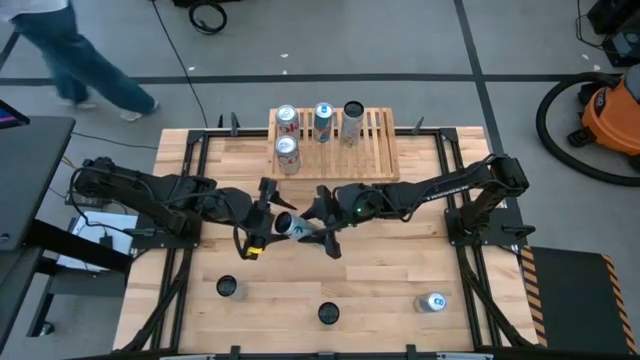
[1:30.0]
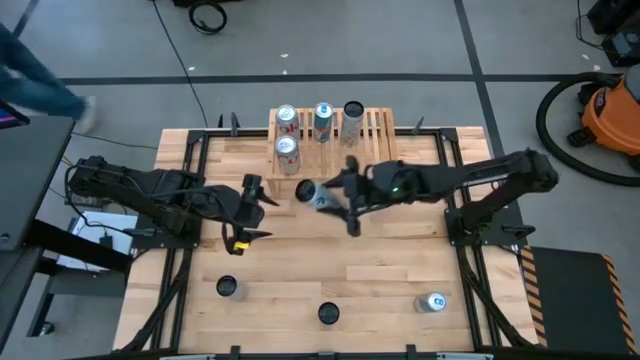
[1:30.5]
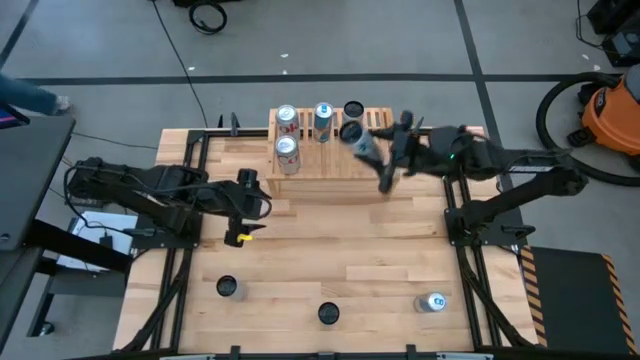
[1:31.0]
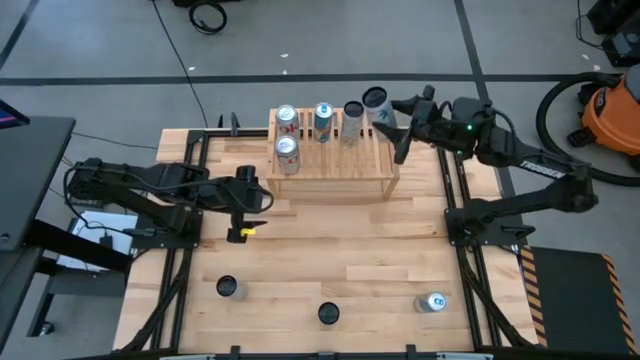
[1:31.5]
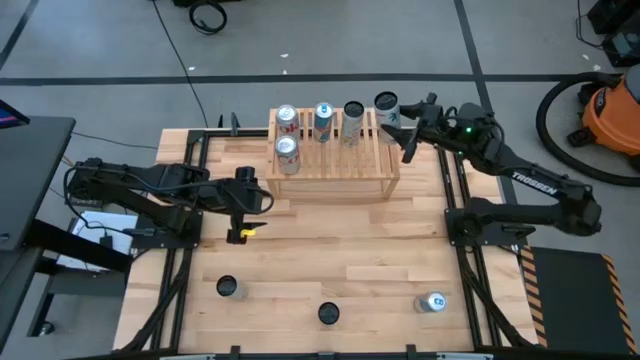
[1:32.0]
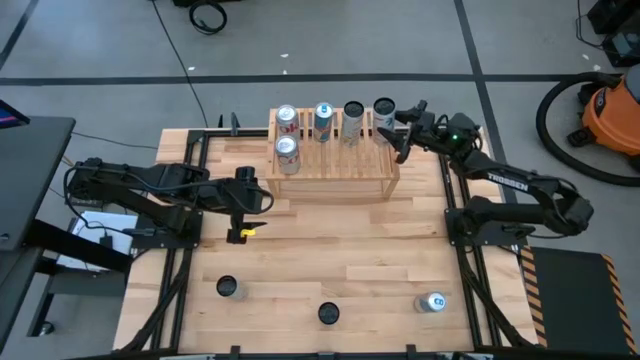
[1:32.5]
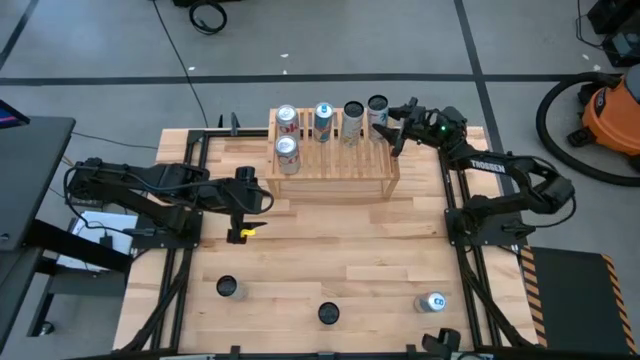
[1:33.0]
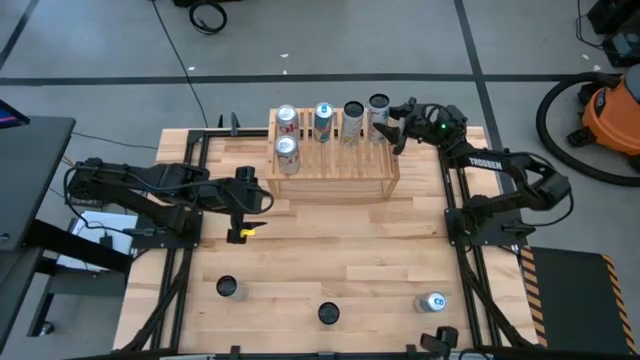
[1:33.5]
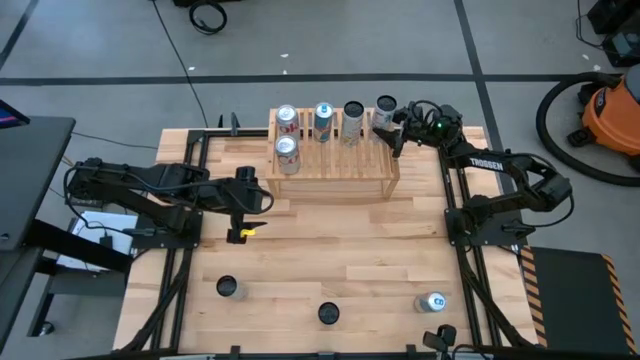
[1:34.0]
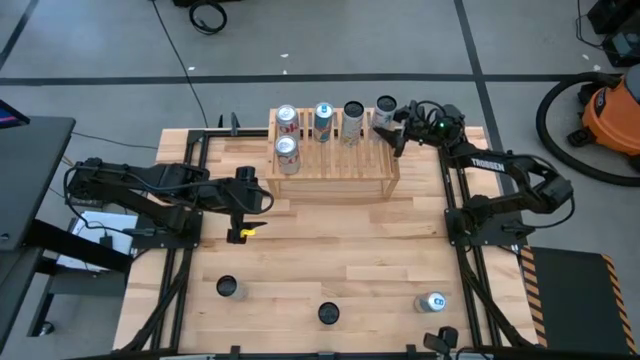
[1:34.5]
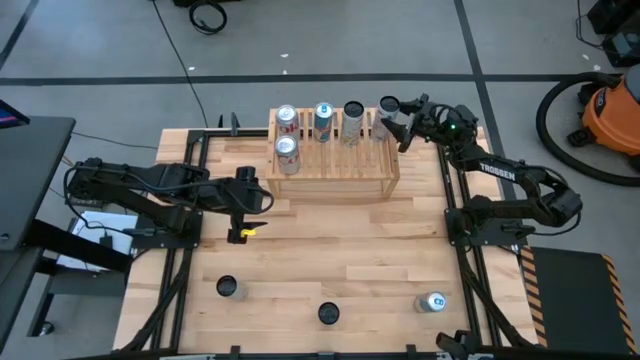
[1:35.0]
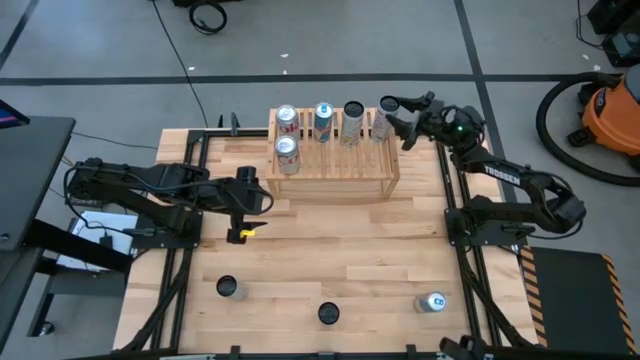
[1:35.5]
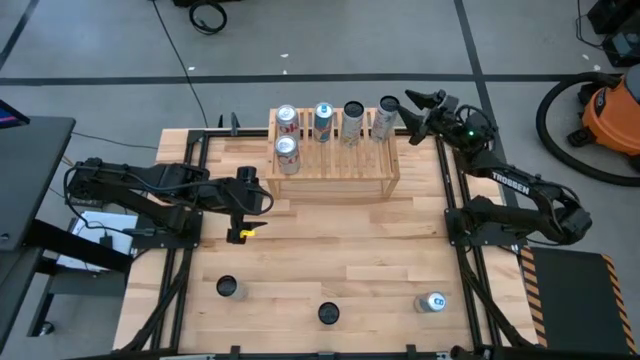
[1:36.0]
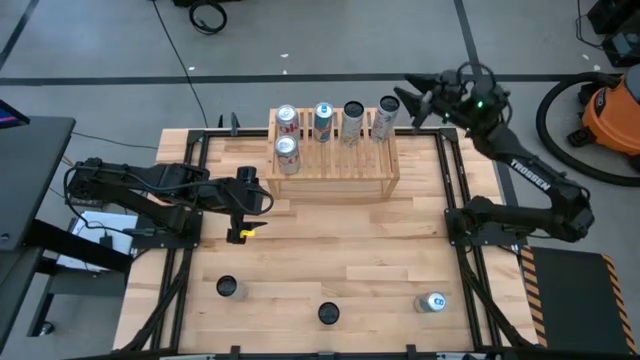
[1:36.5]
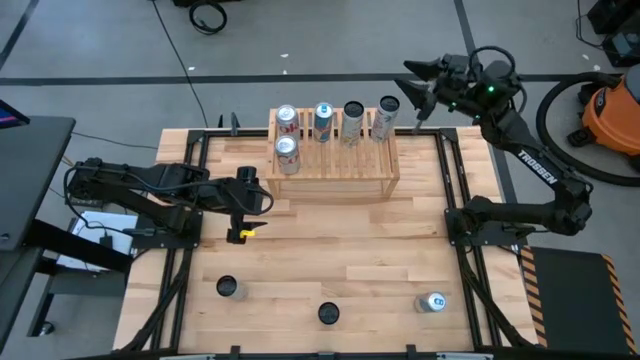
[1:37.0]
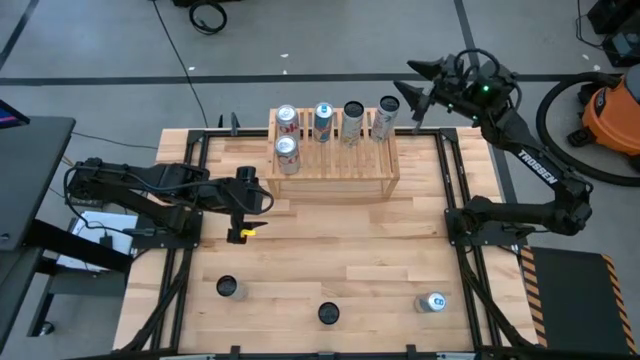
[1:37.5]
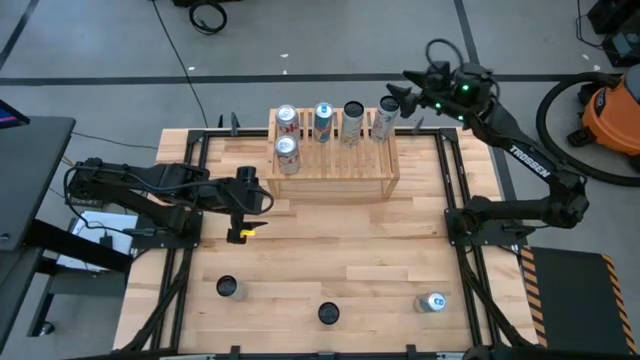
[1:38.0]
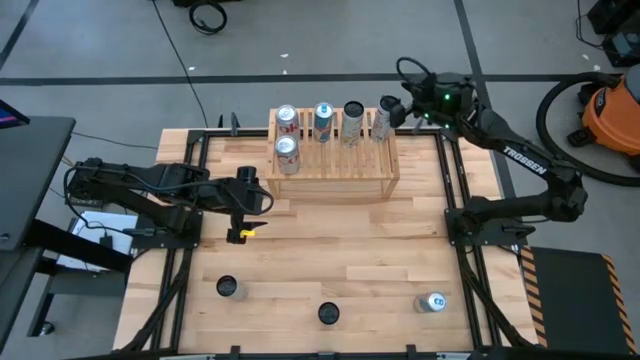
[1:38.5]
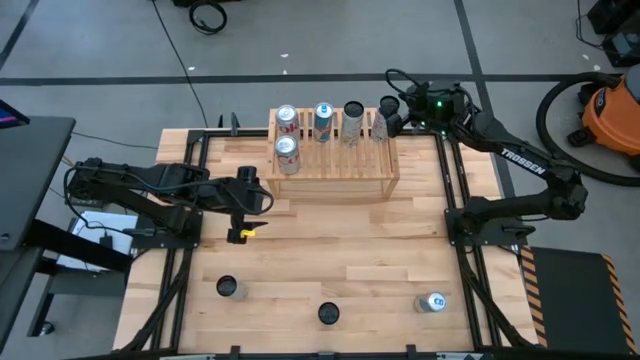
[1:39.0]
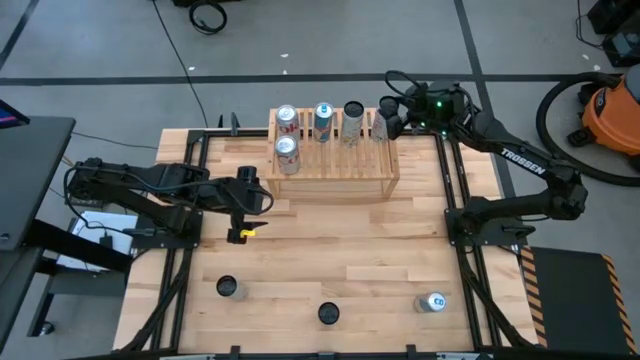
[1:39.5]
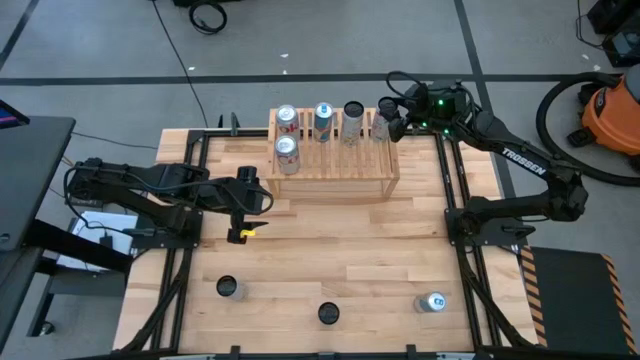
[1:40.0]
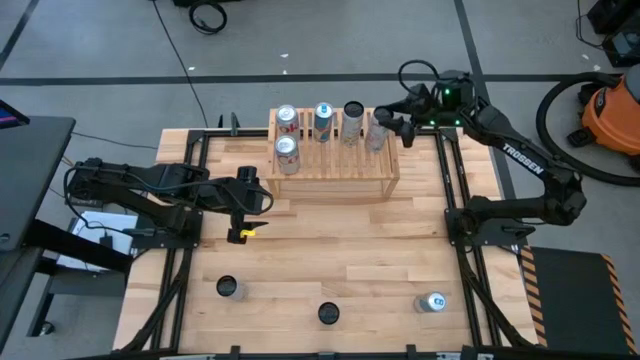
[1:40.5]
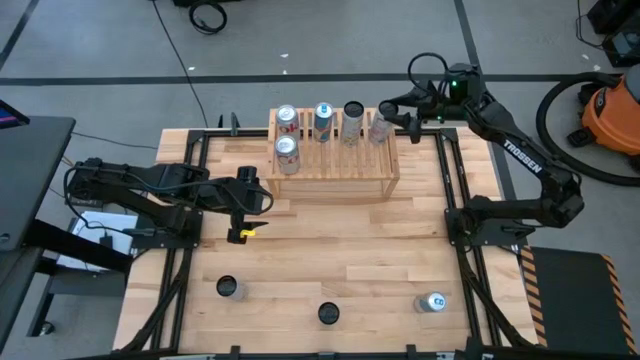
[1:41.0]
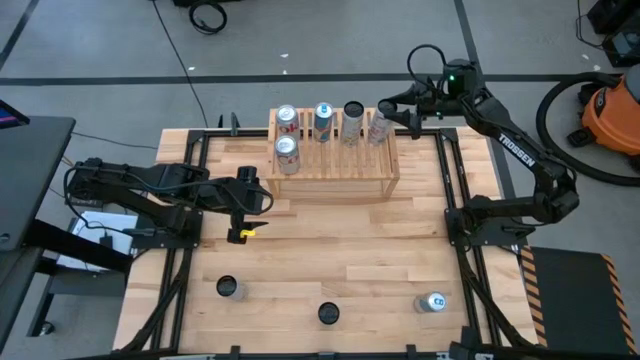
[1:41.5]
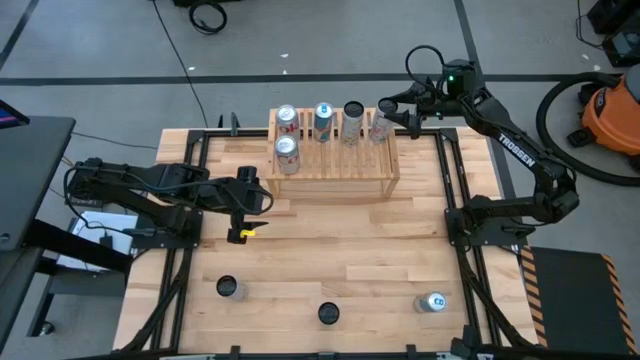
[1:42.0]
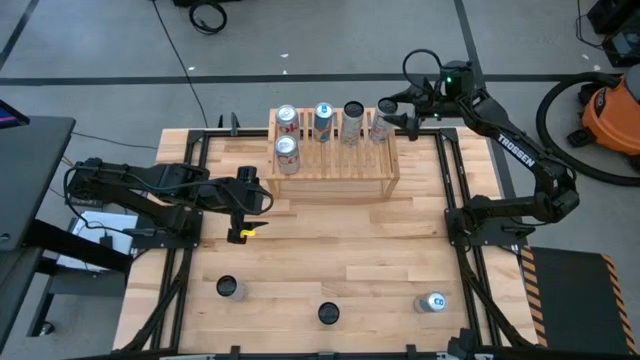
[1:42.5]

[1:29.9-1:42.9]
Task: Place canned beverage on shelf
Put the top white-pink soda can on the shelf

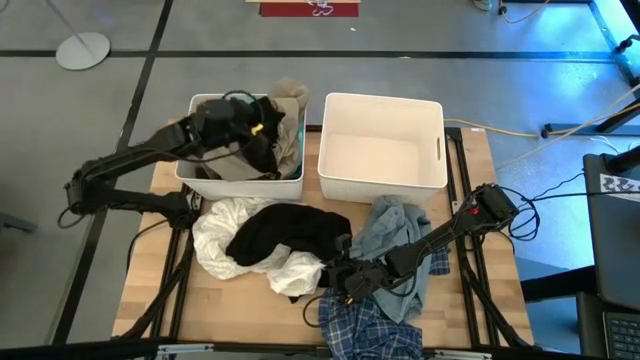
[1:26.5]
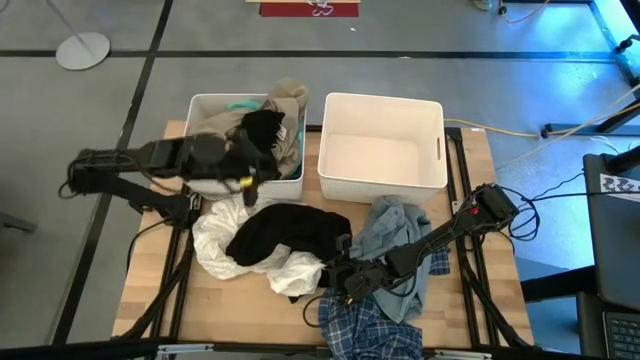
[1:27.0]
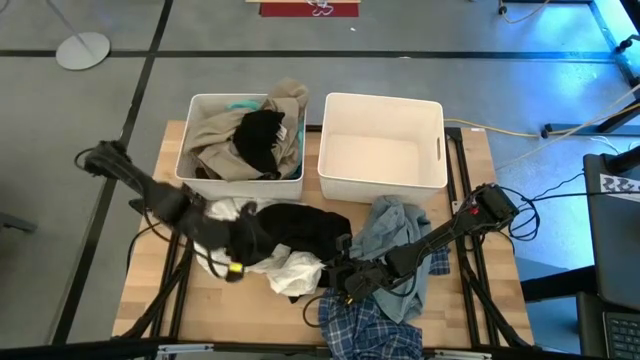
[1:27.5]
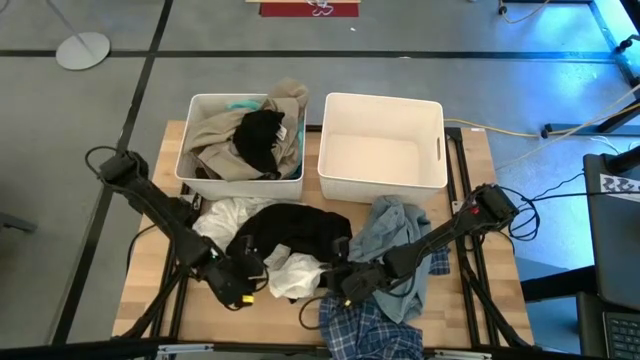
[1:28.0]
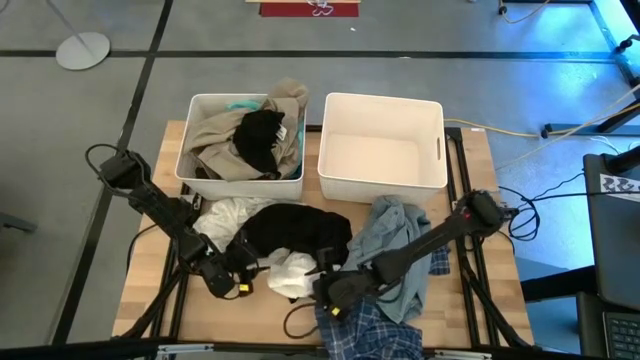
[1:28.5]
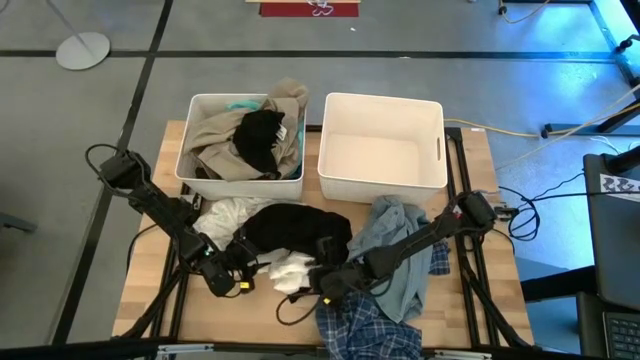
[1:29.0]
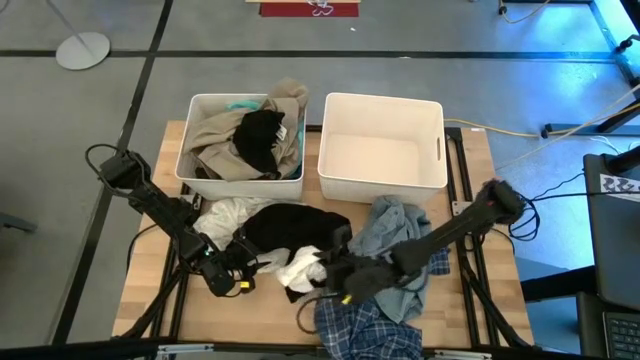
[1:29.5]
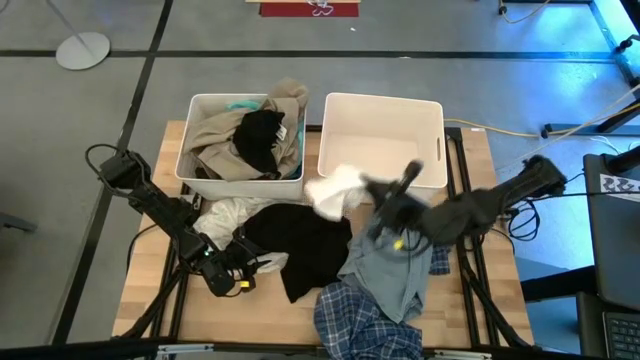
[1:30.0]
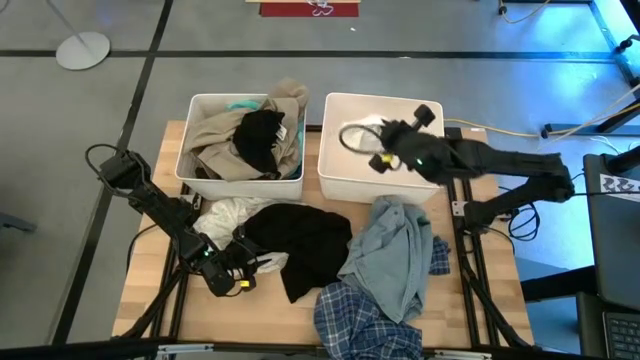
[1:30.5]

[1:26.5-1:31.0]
Task: Sort clothes
Put the white shorts into the right white bin
